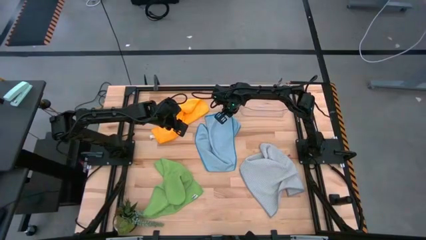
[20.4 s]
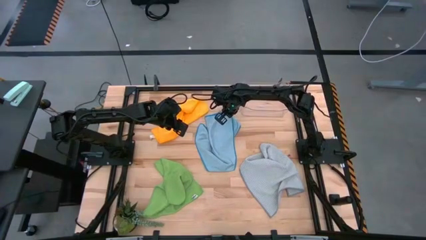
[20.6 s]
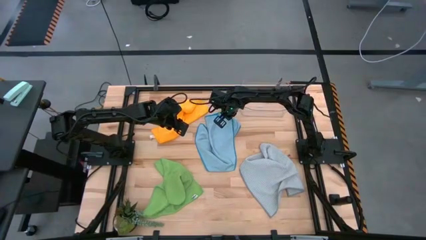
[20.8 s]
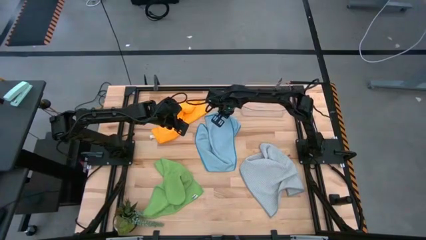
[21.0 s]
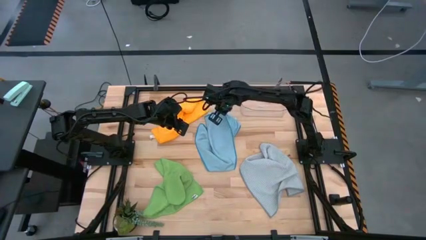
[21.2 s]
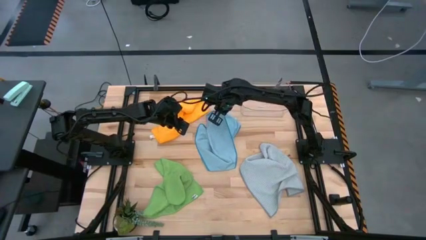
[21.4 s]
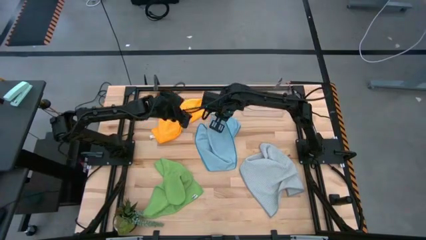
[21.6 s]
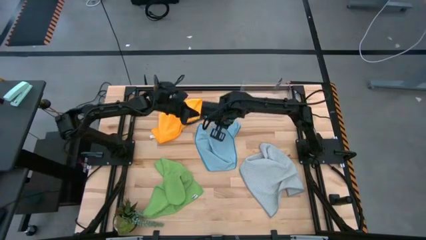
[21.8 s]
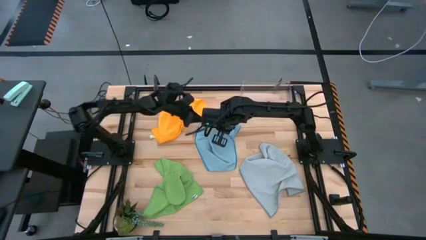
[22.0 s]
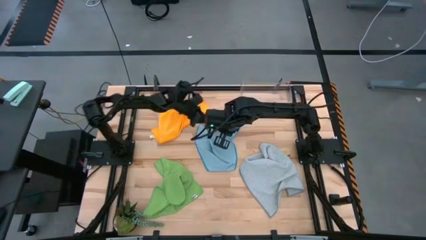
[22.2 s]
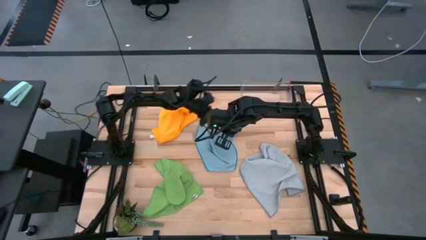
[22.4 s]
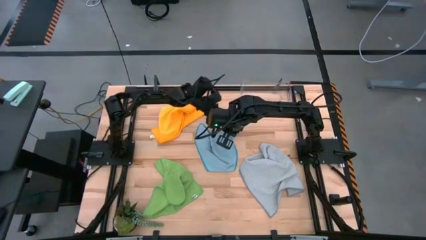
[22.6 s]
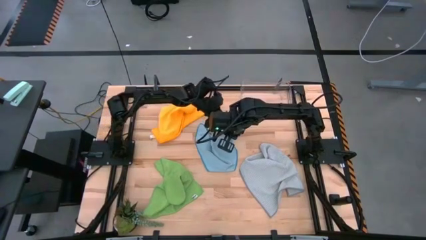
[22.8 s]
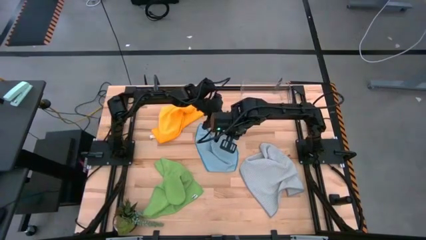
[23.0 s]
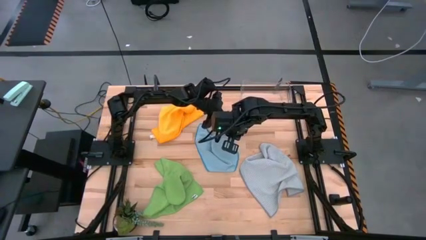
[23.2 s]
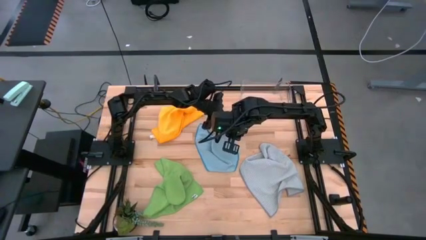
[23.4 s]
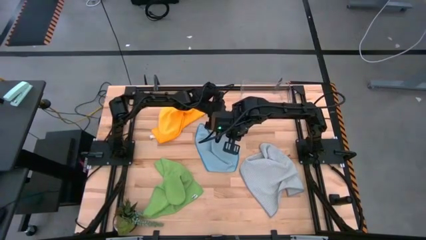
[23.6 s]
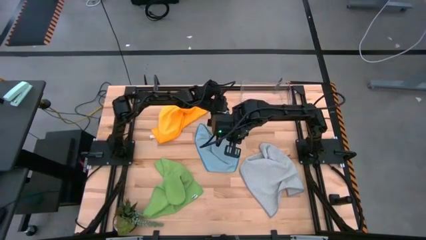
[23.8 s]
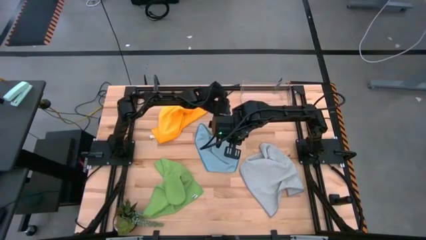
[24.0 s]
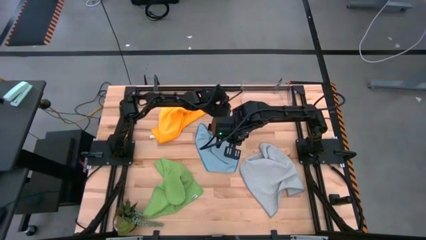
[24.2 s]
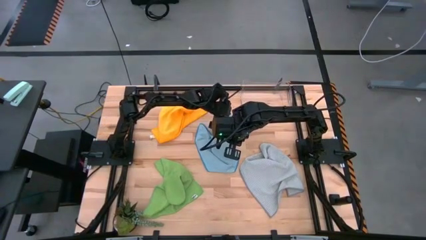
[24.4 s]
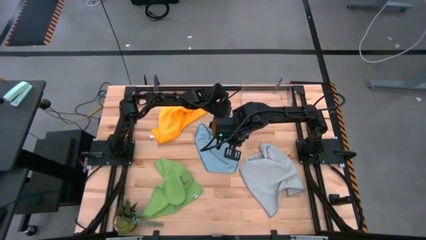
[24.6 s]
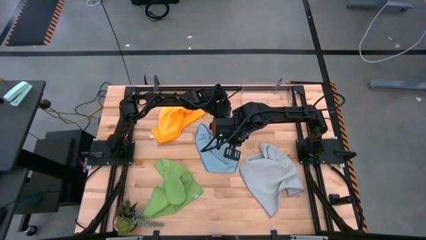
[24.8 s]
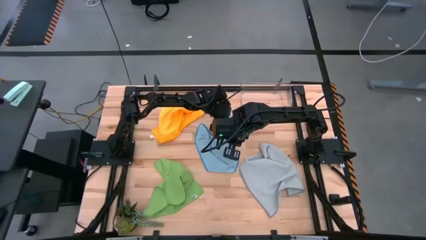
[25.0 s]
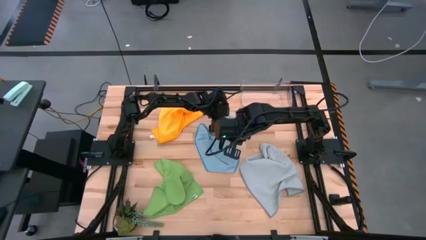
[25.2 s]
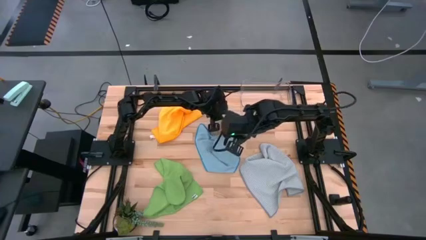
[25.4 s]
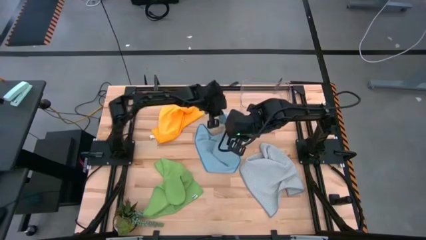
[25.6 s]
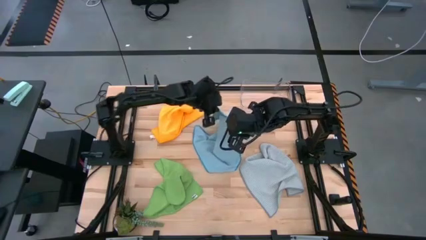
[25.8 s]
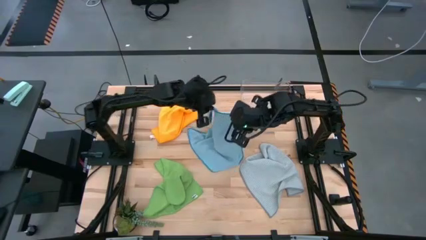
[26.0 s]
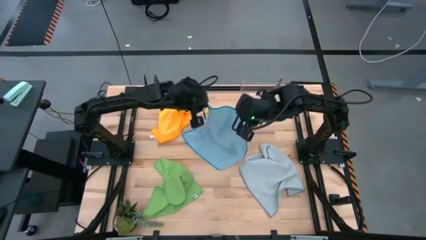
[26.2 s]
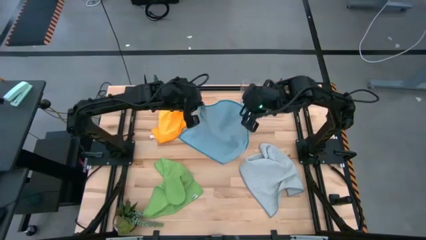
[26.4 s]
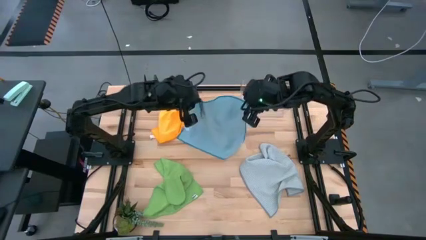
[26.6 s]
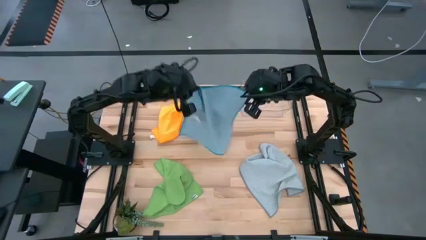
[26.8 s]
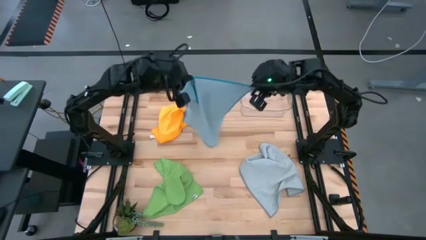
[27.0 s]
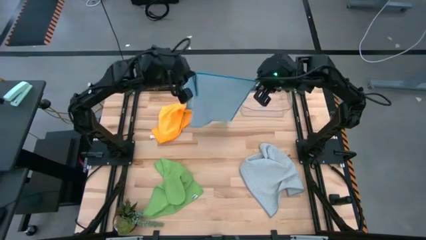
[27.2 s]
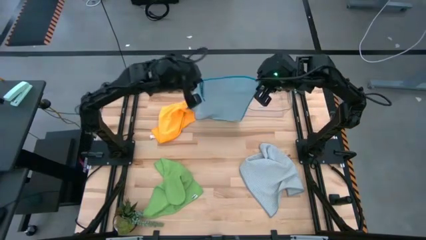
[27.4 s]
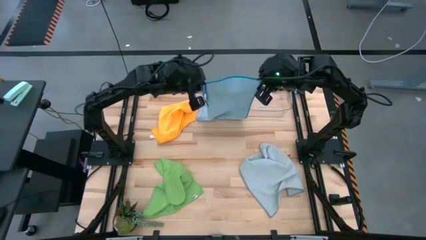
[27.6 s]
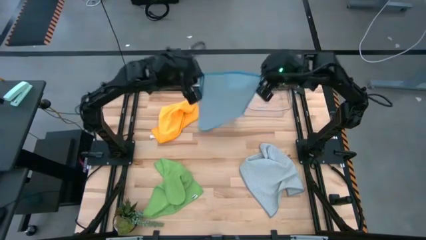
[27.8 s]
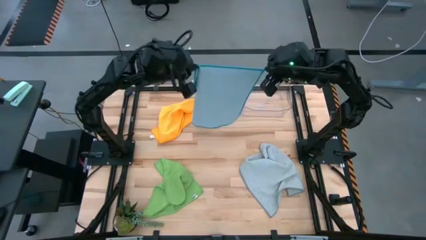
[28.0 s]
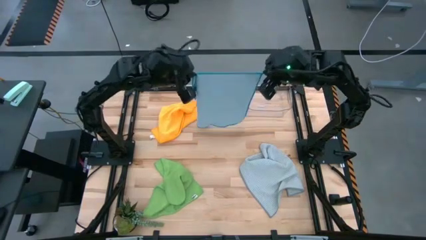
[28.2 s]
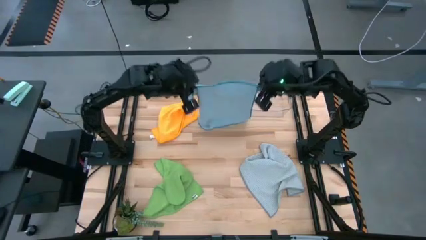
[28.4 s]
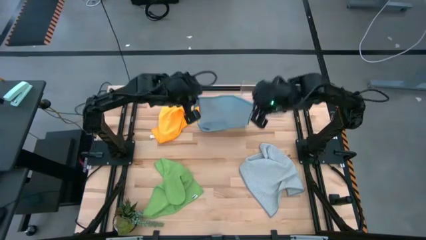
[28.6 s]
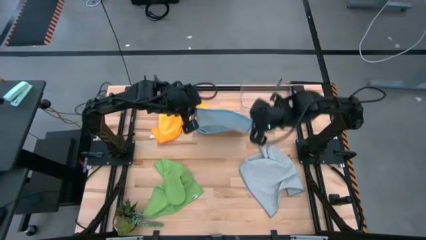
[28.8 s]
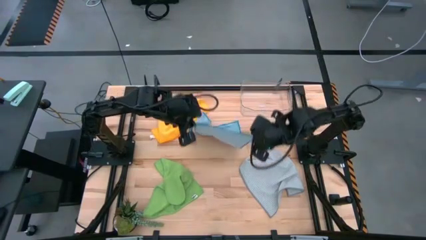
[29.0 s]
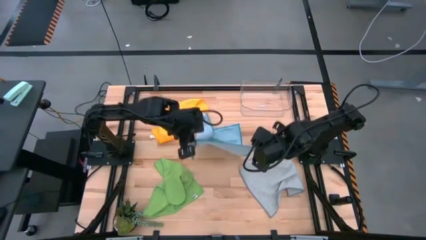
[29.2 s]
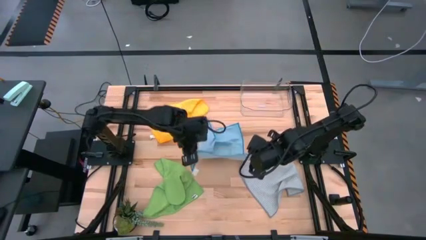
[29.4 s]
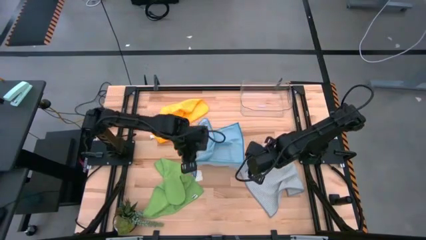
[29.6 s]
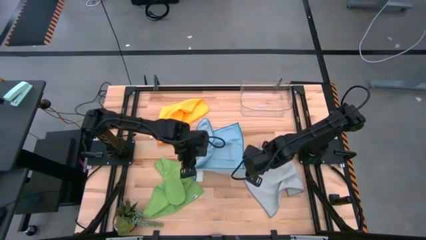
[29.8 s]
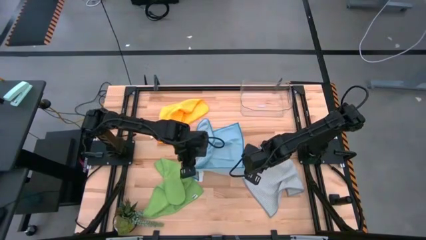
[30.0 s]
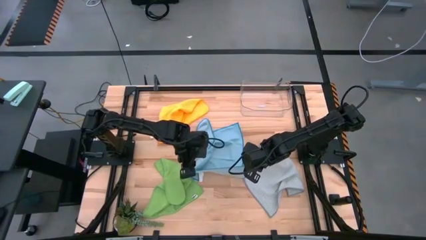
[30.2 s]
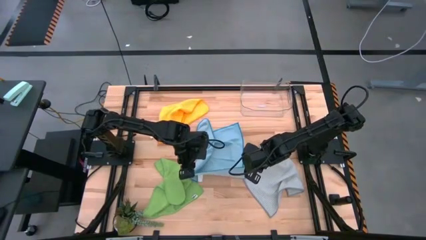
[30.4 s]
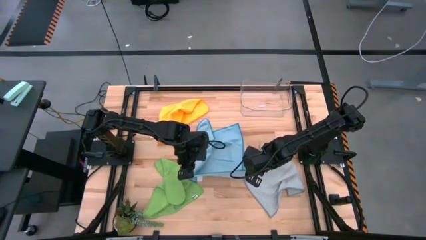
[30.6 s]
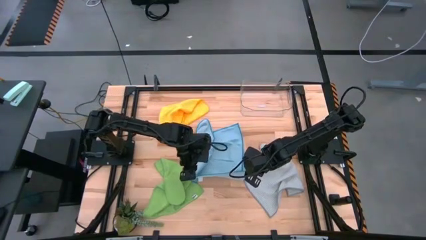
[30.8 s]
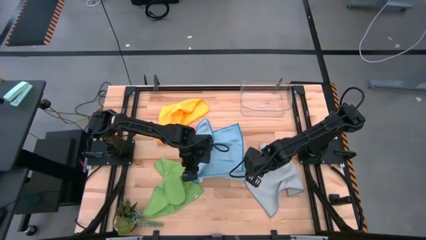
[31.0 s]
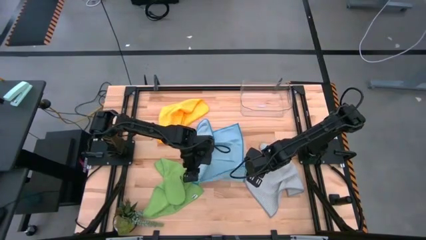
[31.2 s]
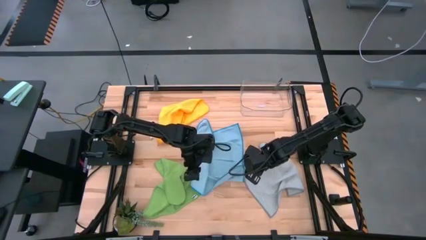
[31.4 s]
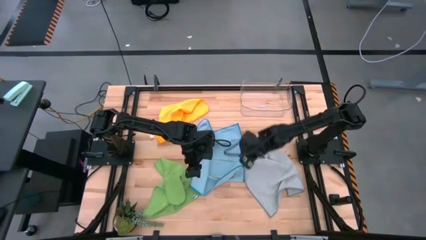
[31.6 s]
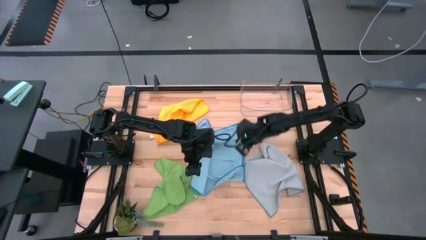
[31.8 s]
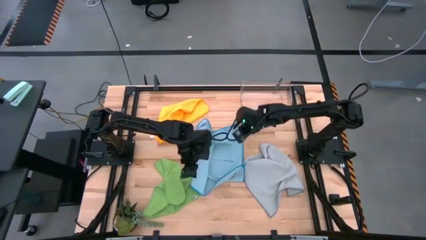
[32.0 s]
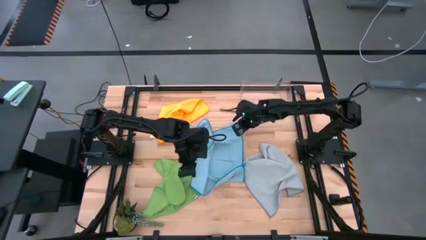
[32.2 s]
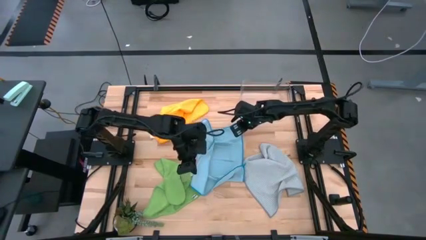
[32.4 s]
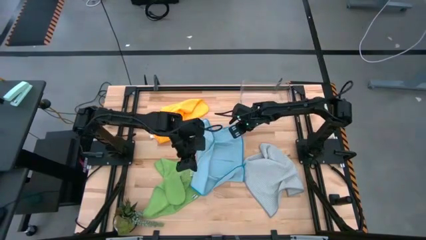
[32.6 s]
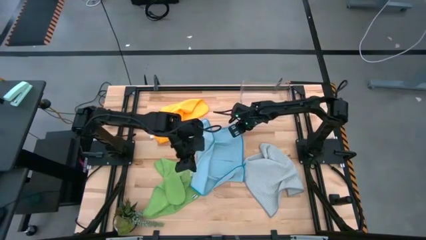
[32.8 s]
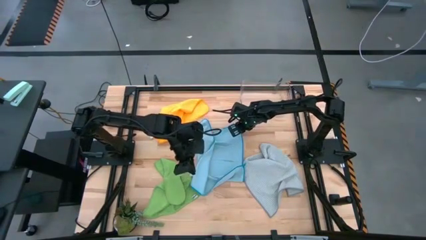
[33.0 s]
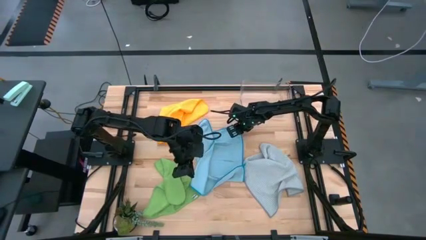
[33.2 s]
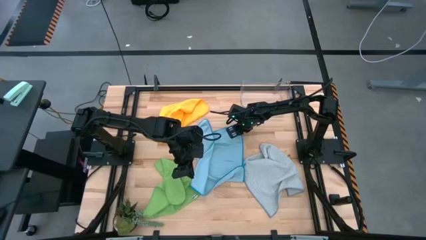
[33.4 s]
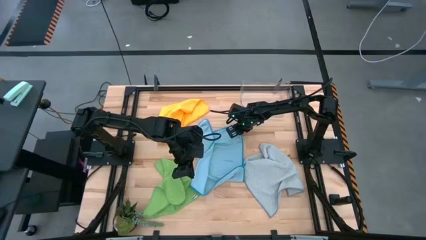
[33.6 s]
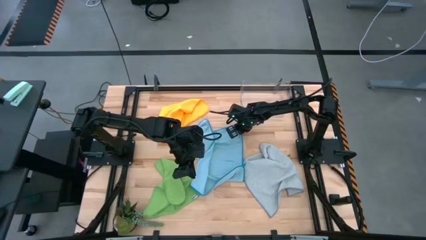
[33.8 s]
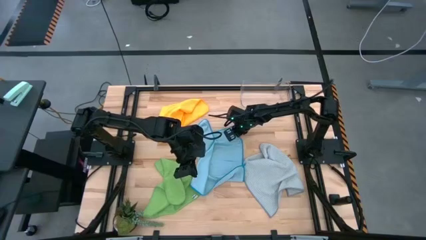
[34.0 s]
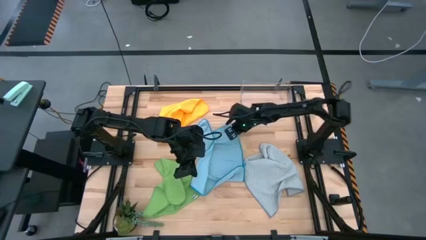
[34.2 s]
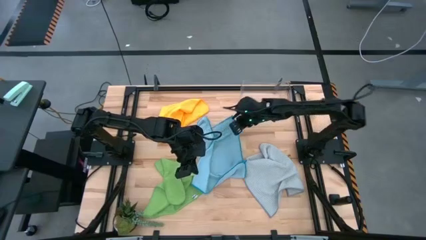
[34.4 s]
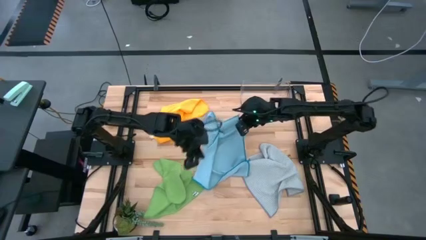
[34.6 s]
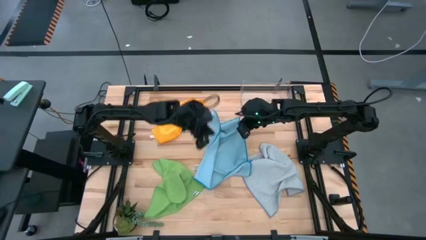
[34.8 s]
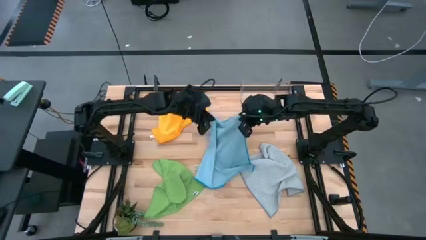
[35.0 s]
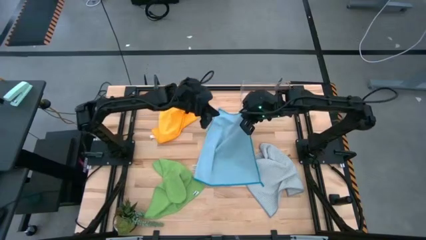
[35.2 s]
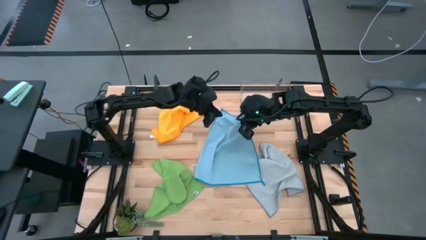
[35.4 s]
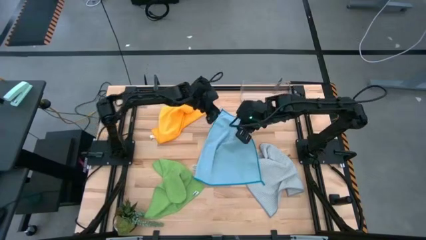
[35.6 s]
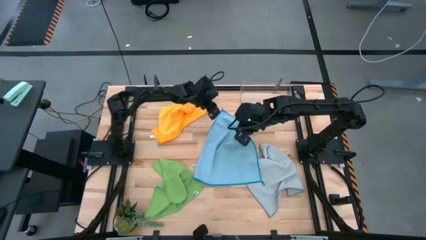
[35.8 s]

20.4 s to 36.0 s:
Task: Fold microfiber towels
Fold the blue microfiber cloth

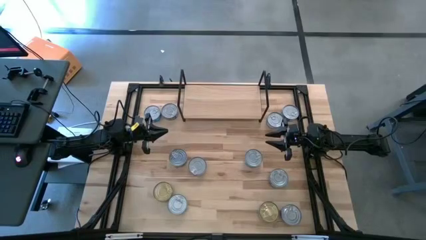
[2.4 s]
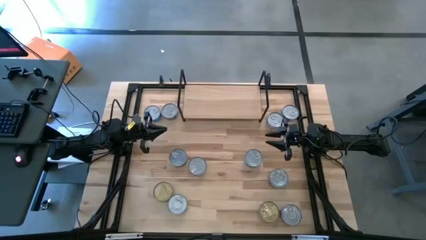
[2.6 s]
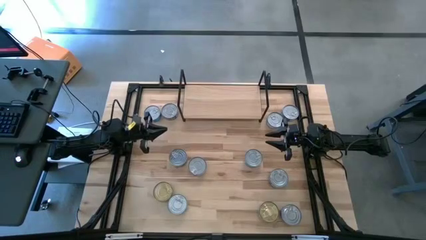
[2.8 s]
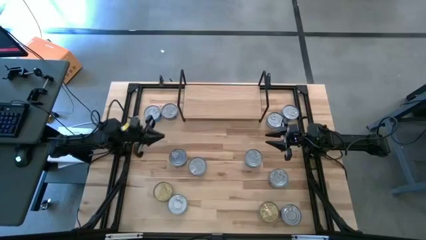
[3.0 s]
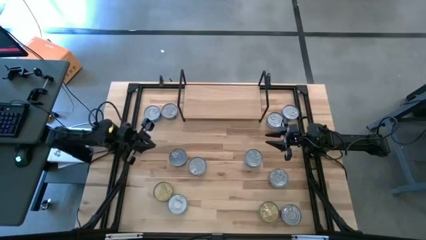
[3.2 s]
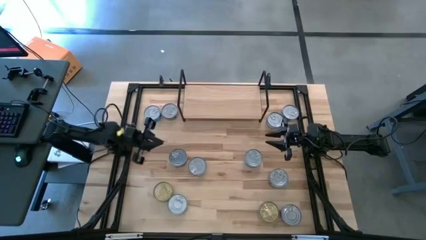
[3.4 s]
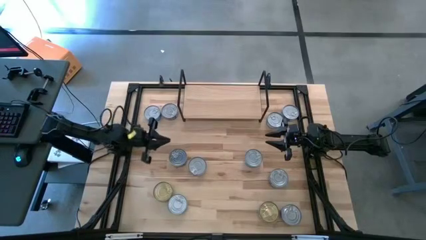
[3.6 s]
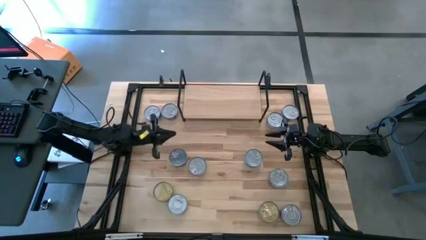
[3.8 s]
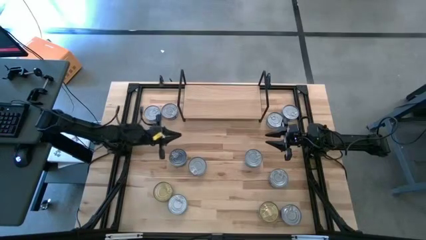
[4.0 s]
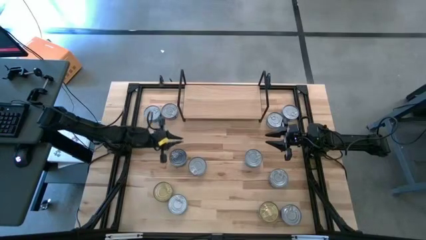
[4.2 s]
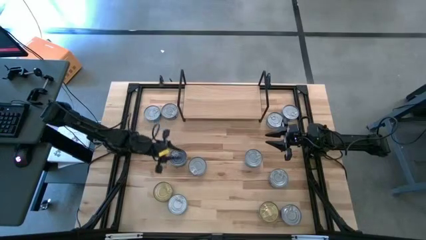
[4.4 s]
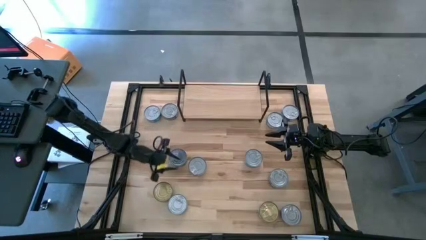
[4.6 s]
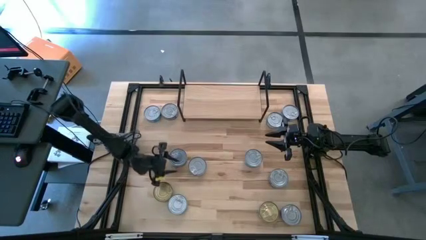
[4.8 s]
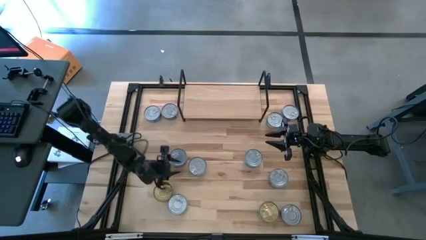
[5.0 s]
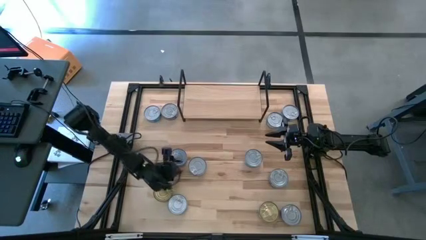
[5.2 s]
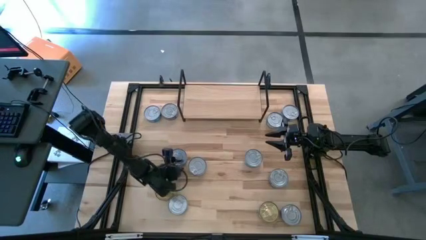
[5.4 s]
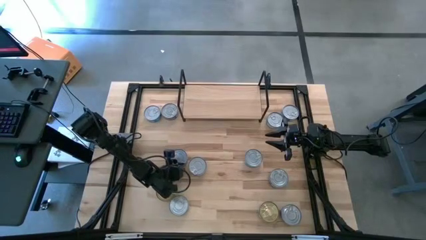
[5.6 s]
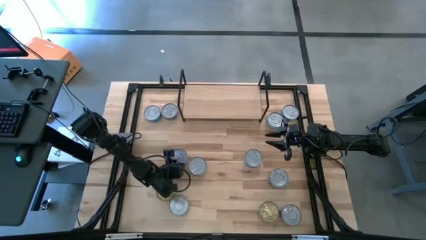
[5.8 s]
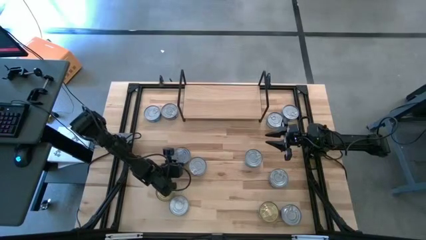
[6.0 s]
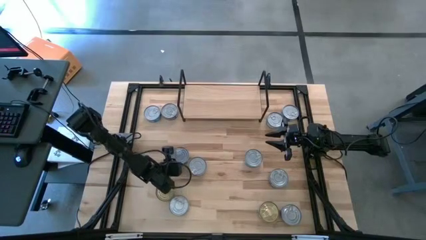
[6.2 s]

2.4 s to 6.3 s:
Task: Stack canned seafood by type on shelf
Put the green tuna can on the shelf
